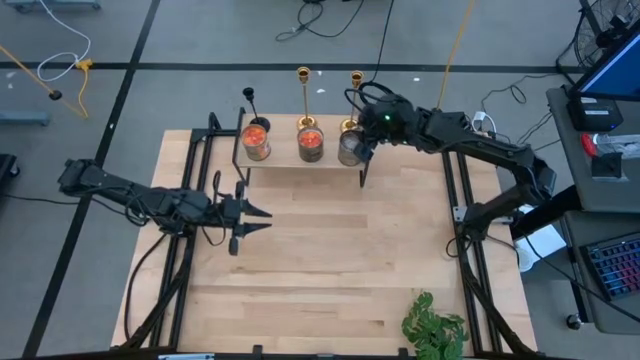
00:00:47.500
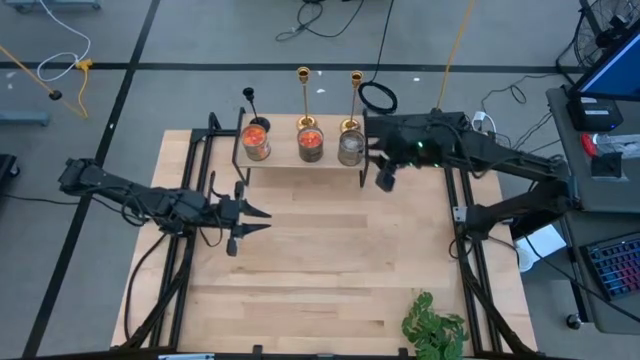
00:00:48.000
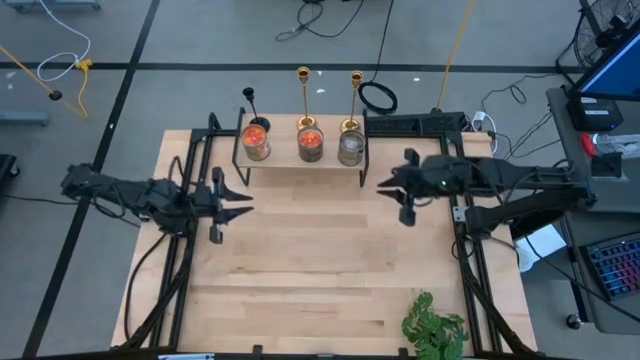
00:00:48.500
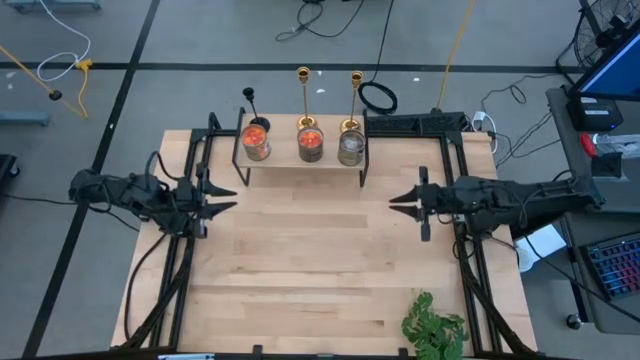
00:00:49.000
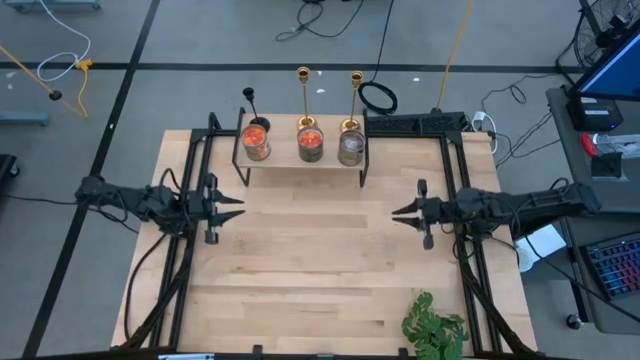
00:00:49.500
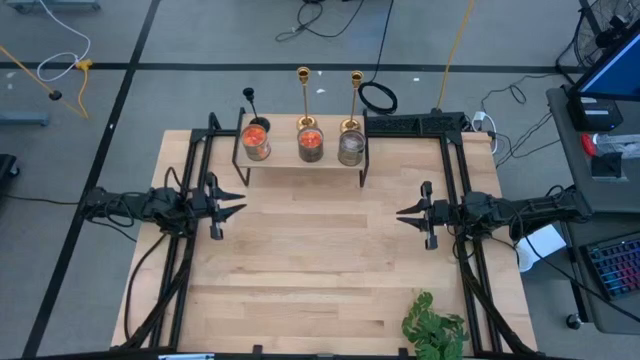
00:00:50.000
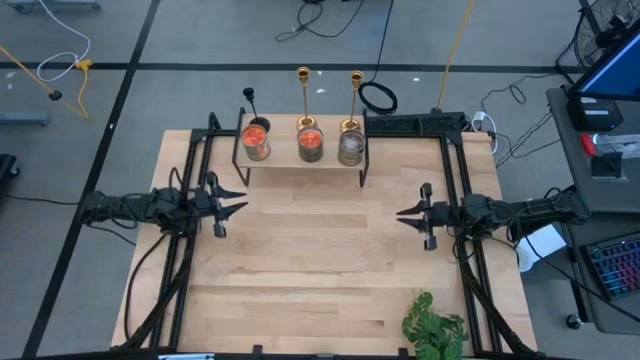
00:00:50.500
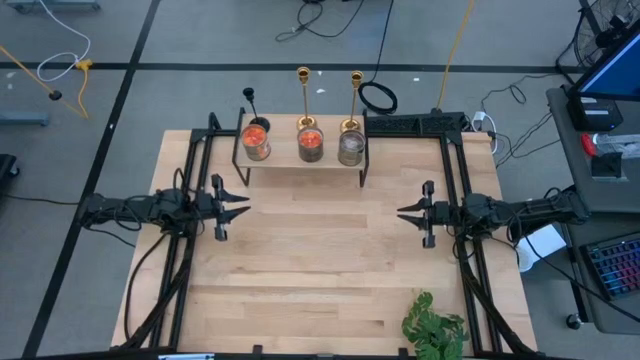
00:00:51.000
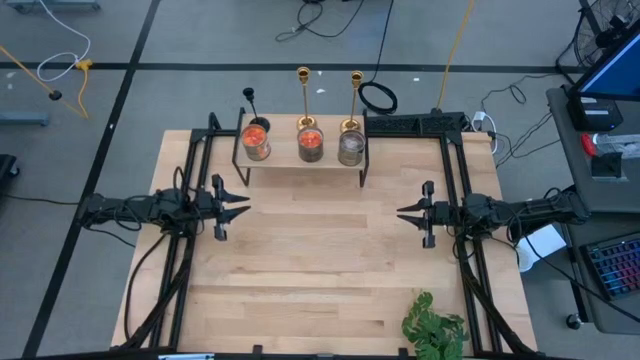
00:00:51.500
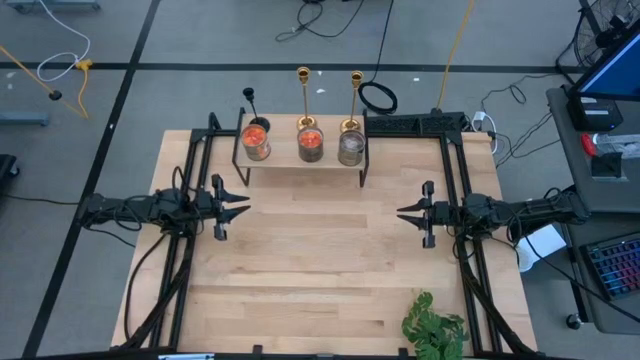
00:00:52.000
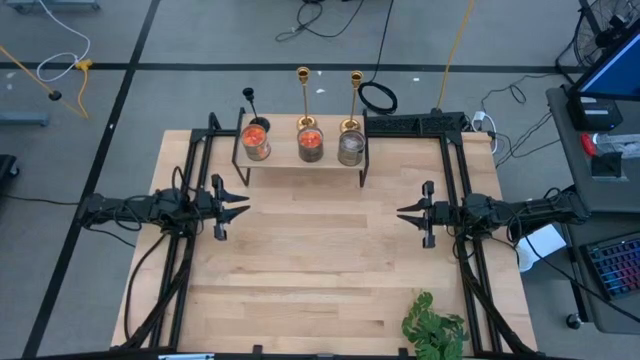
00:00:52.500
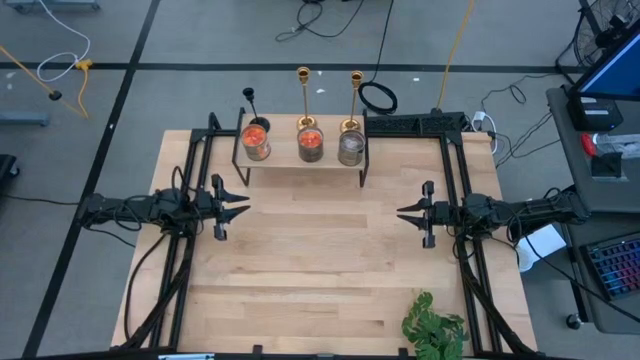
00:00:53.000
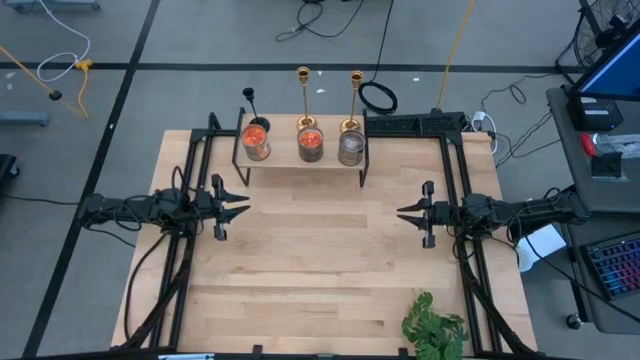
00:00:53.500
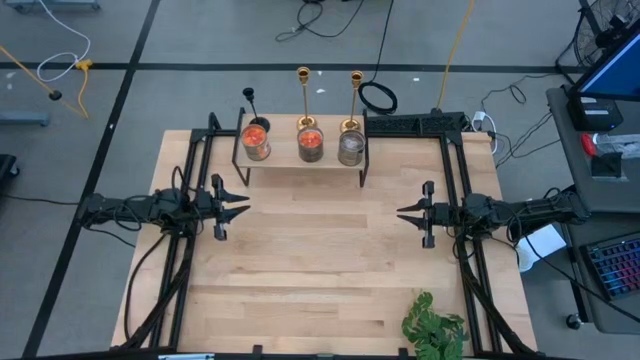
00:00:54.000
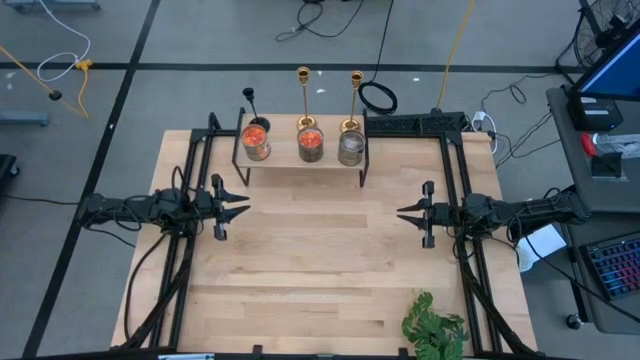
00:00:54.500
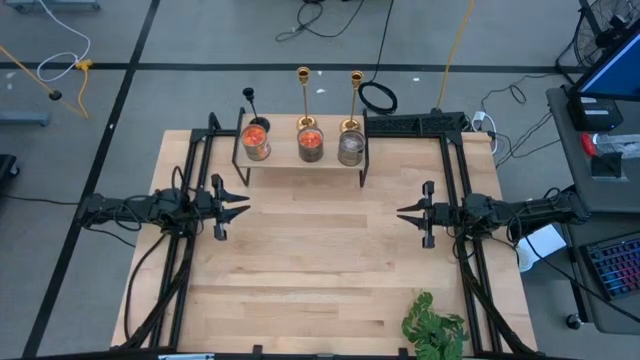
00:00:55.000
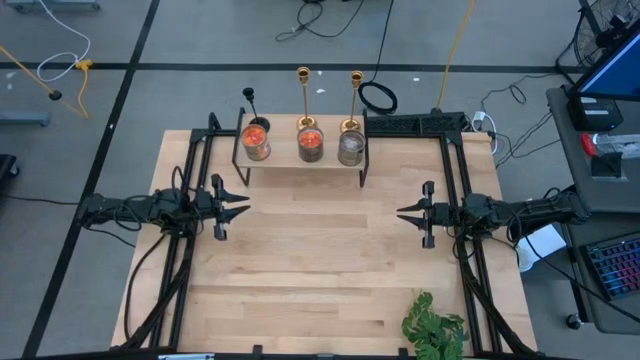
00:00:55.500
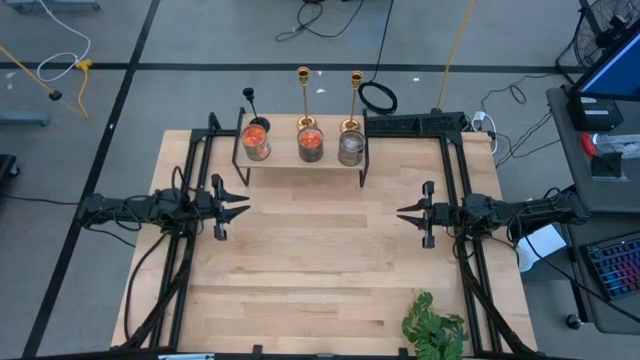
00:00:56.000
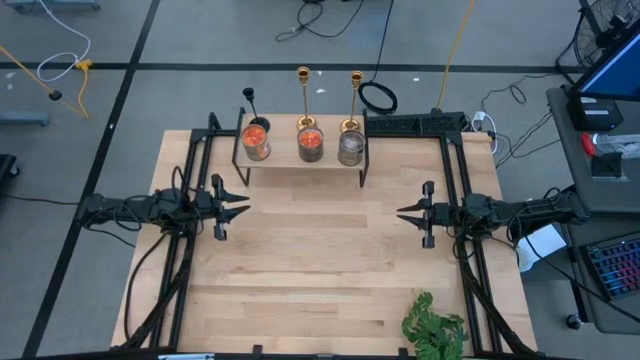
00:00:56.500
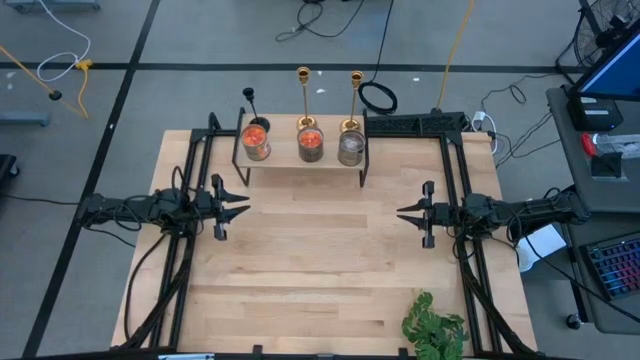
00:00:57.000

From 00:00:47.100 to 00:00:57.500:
Task: Pick & Place candle stick holders
Return to Home Position

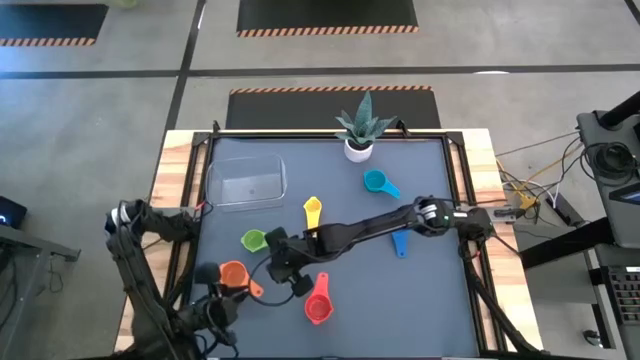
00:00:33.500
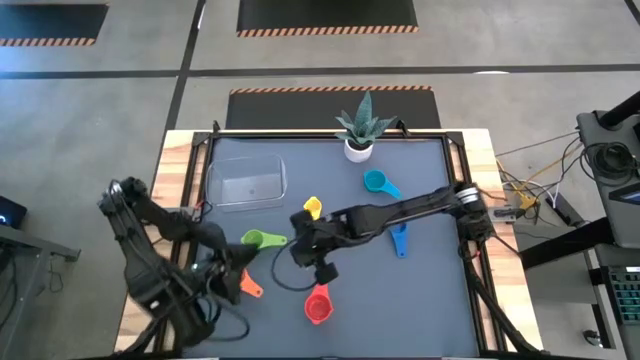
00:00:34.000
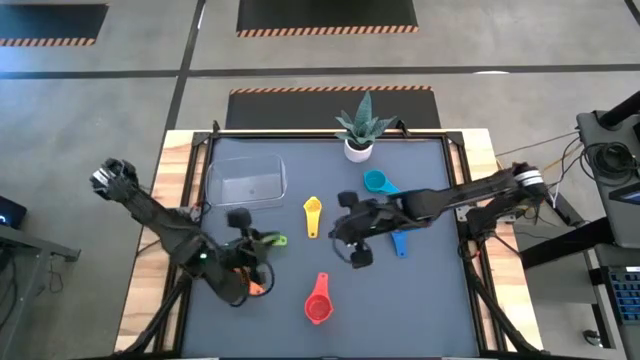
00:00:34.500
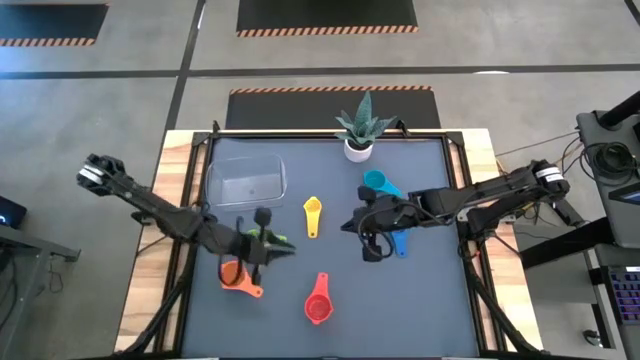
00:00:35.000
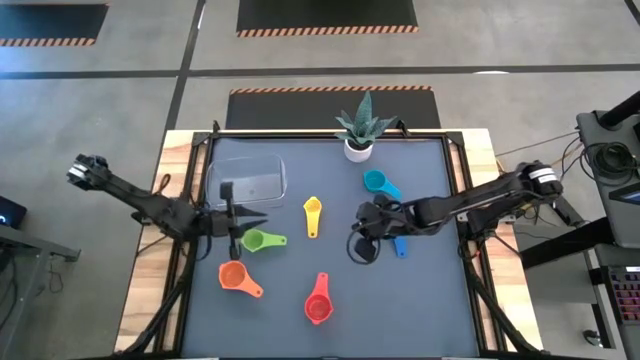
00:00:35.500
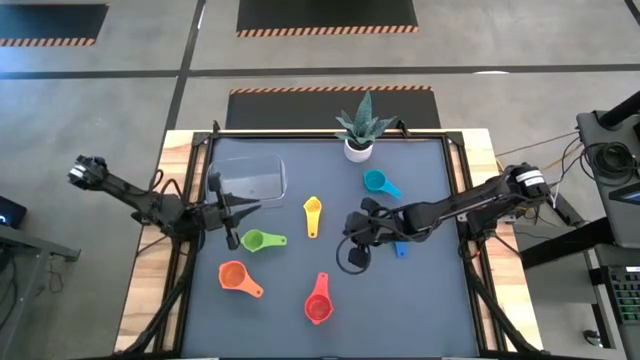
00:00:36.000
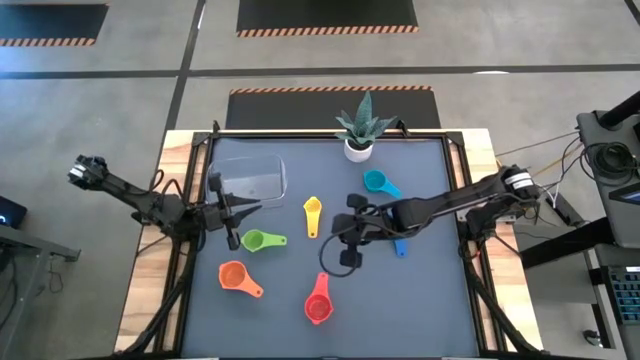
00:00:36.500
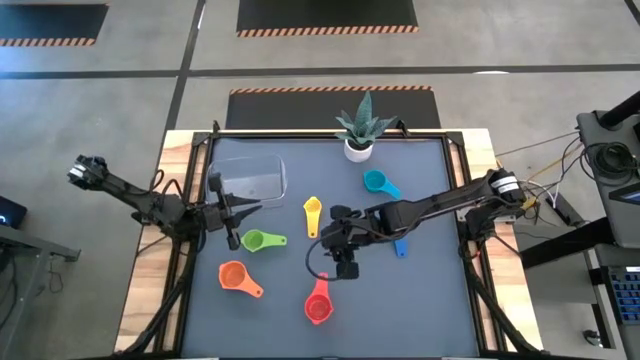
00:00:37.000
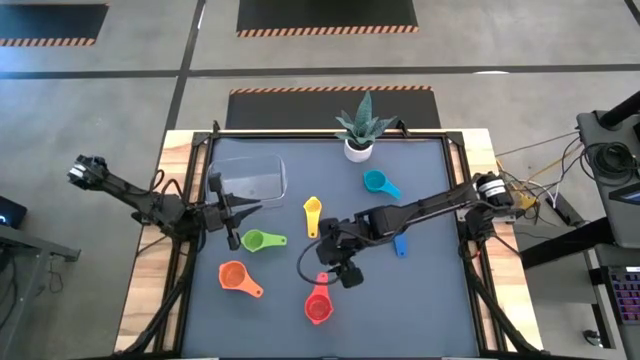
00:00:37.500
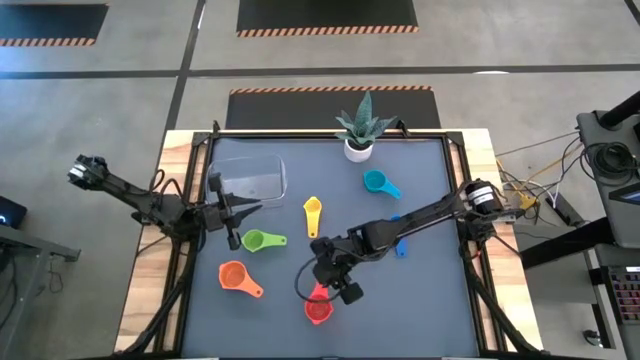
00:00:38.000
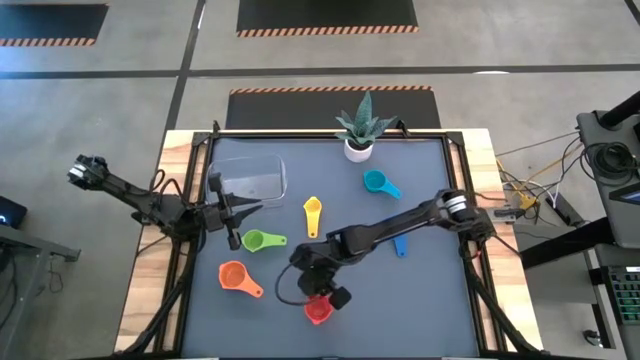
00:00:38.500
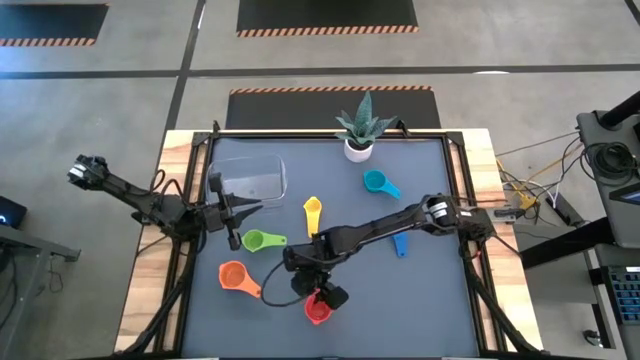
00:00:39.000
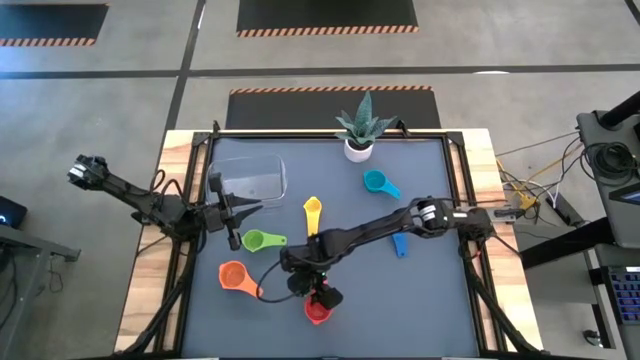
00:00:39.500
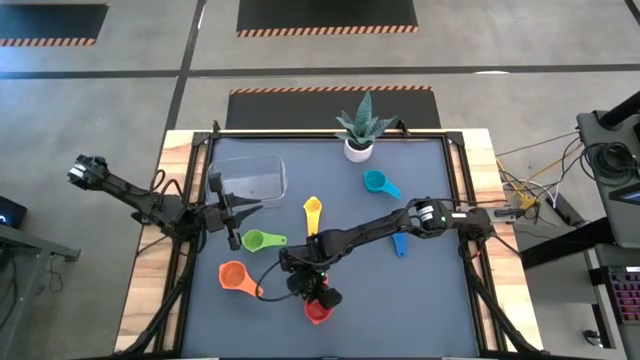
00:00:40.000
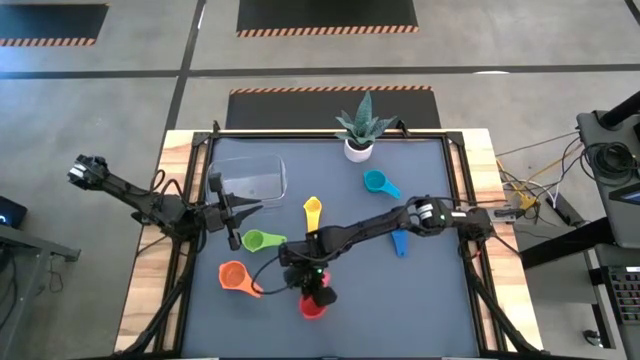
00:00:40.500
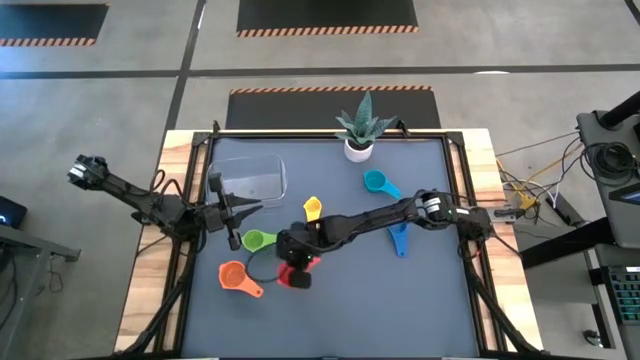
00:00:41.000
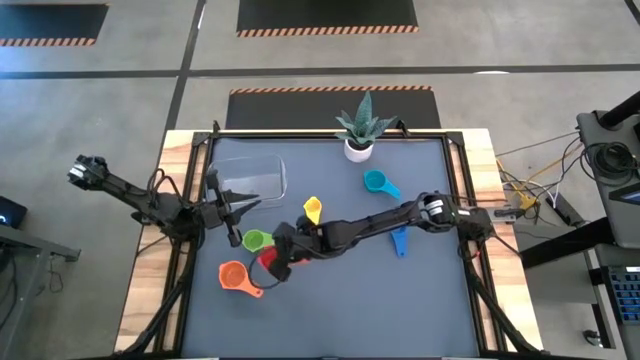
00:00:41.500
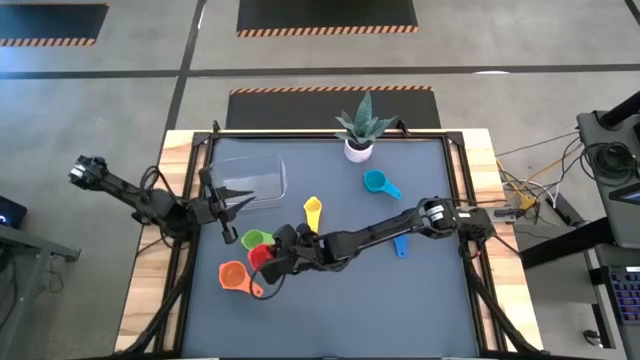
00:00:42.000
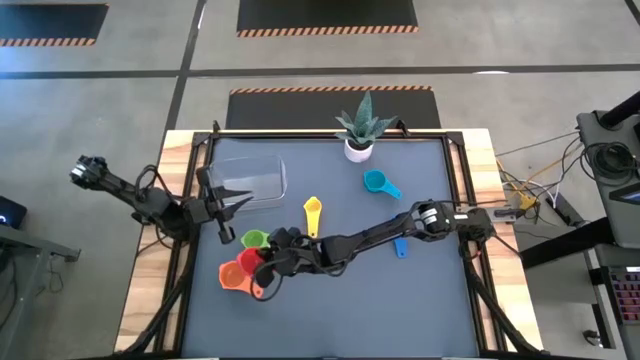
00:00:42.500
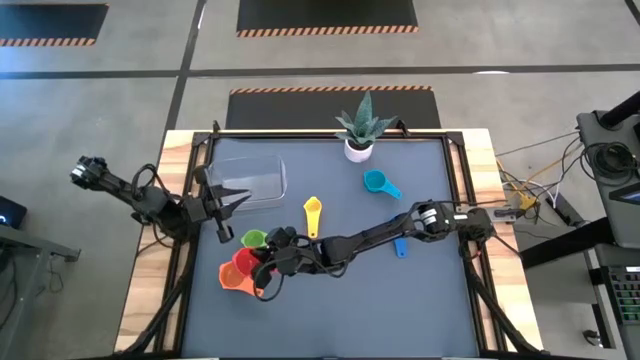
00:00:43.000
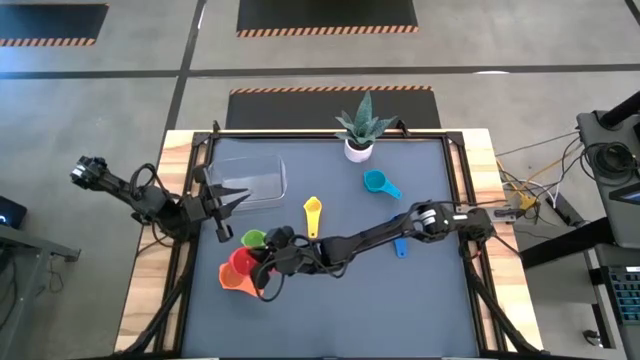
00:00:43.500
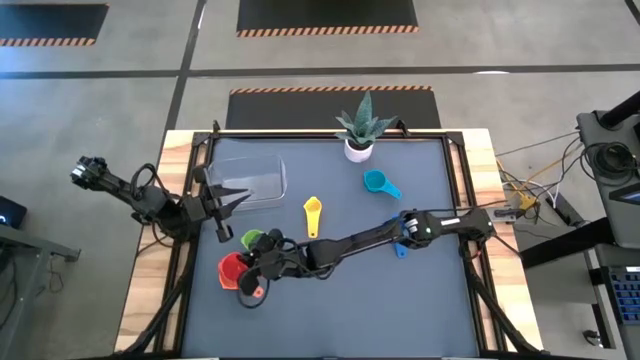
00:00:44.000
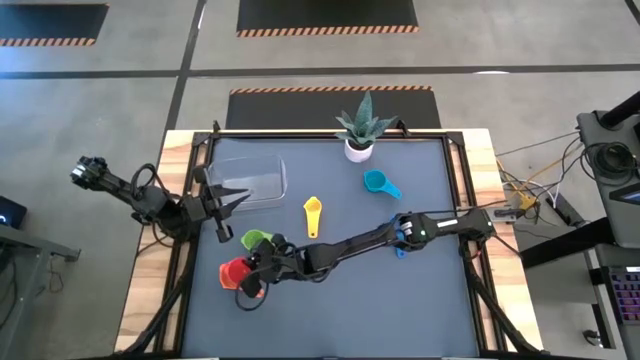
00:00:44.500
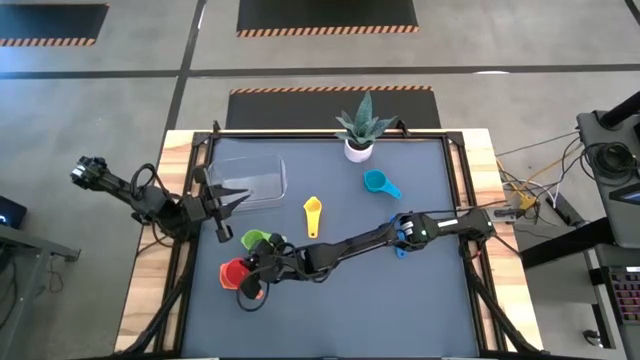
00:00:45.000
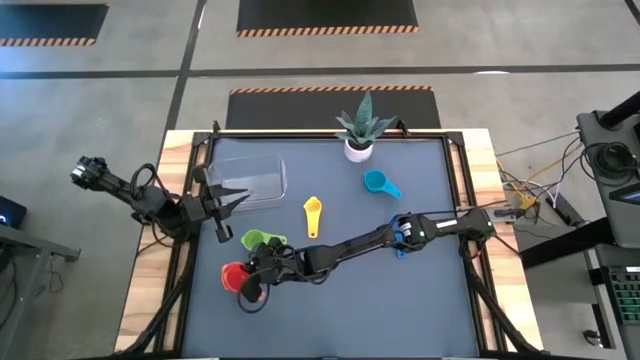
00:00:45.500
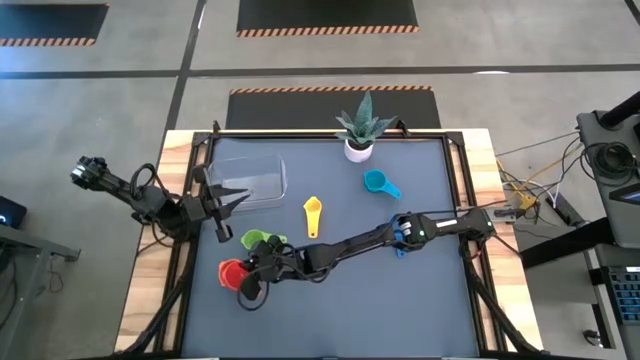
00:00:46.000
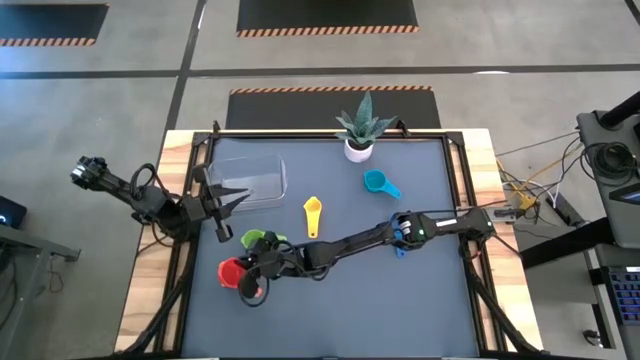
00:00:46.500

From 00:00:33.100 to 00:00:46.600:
Task: Nest measuring cups in basket
Stack the red measuring cup on top of the orange measuring cup
